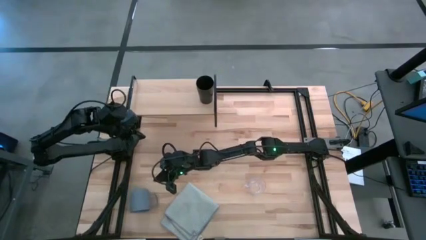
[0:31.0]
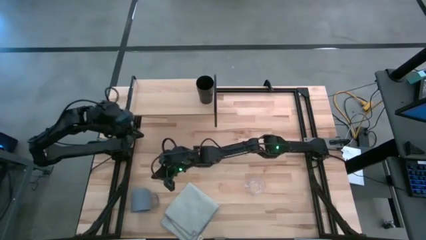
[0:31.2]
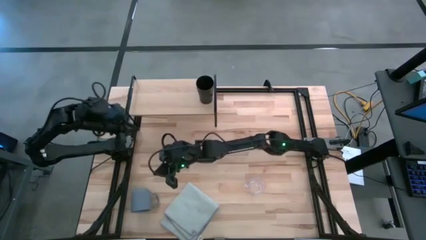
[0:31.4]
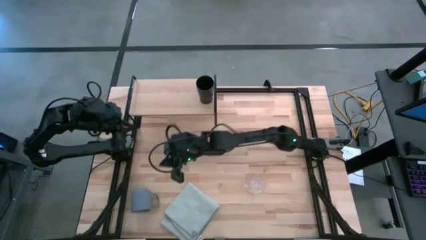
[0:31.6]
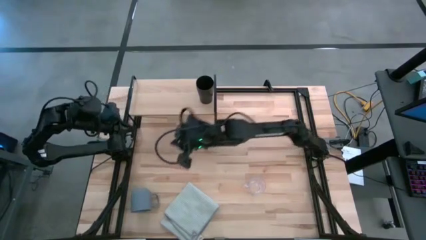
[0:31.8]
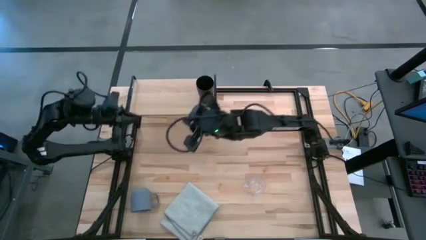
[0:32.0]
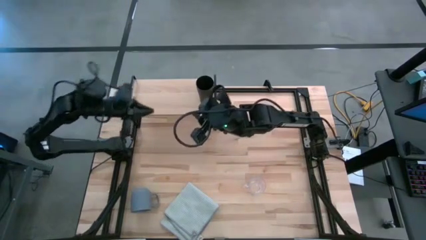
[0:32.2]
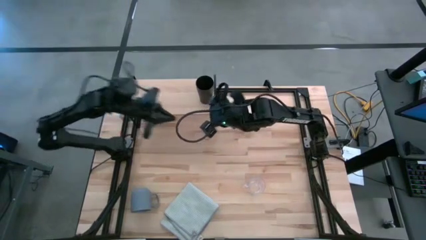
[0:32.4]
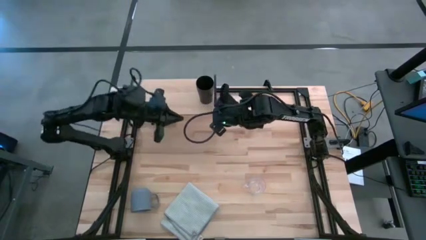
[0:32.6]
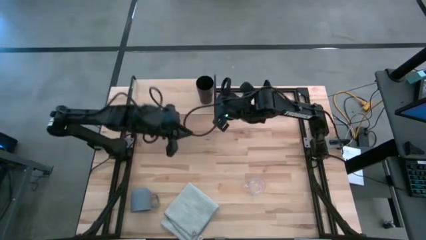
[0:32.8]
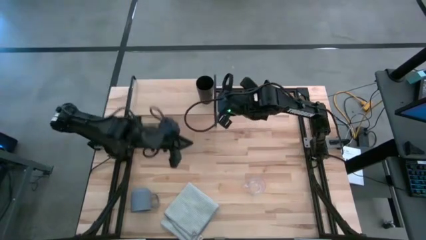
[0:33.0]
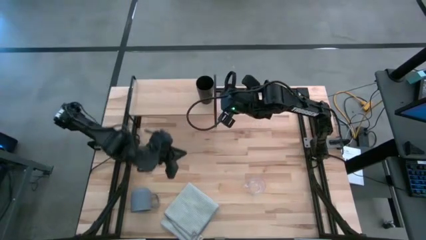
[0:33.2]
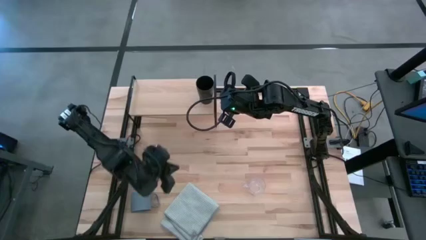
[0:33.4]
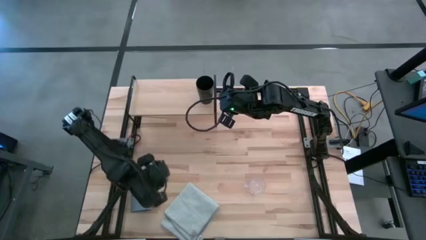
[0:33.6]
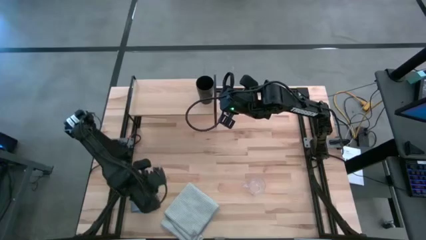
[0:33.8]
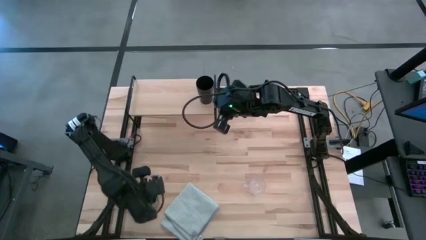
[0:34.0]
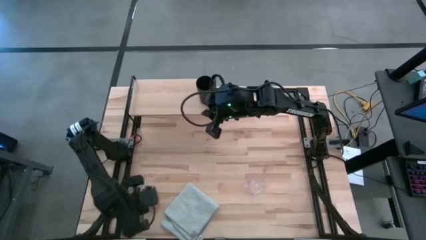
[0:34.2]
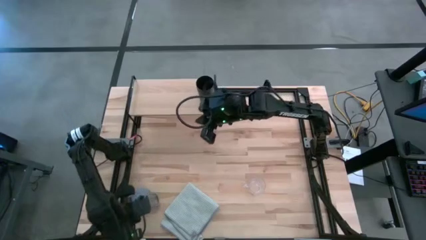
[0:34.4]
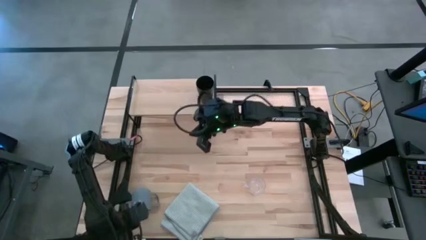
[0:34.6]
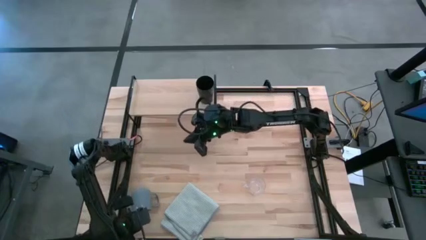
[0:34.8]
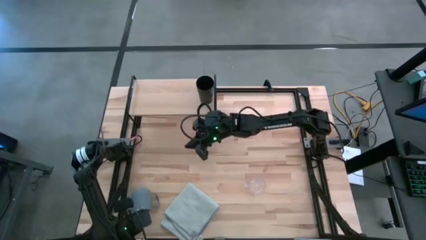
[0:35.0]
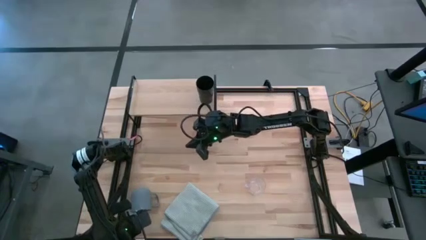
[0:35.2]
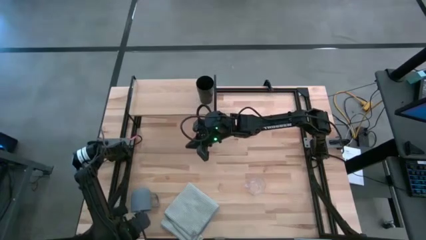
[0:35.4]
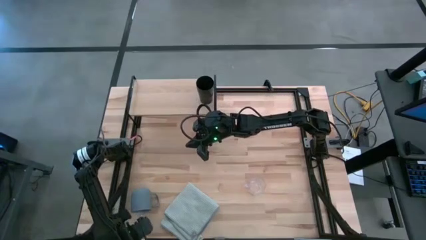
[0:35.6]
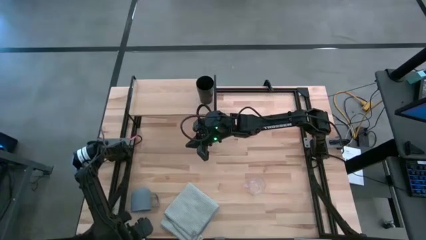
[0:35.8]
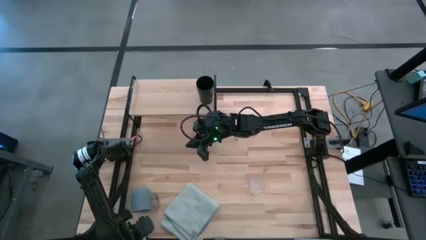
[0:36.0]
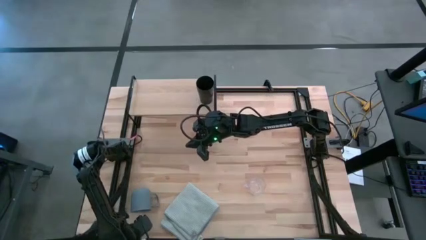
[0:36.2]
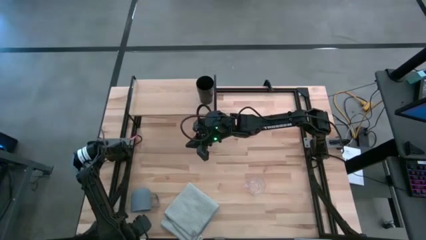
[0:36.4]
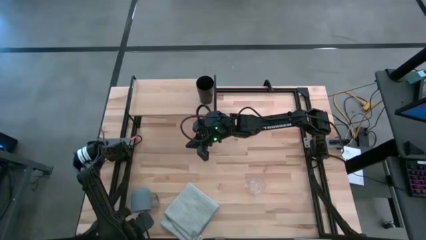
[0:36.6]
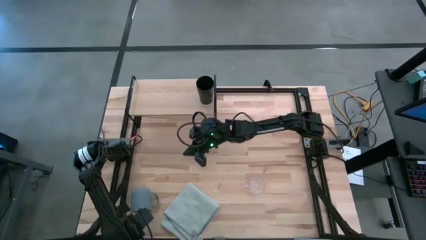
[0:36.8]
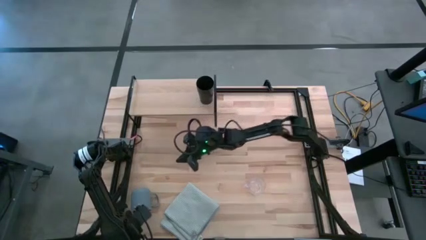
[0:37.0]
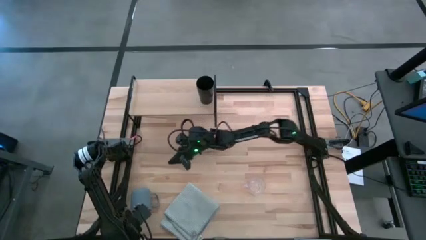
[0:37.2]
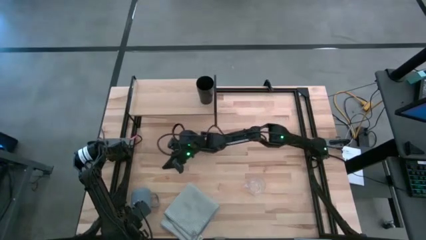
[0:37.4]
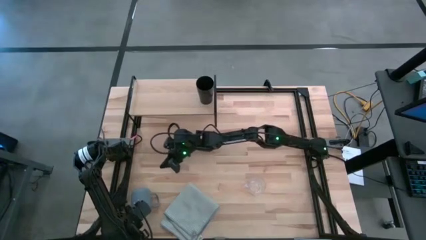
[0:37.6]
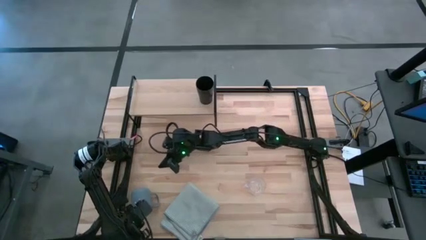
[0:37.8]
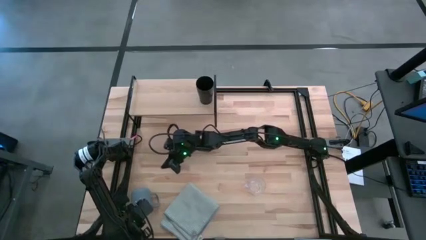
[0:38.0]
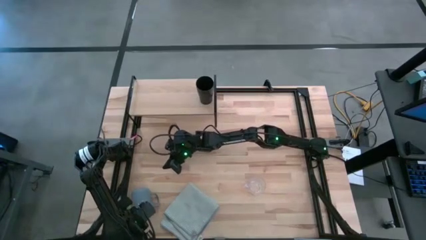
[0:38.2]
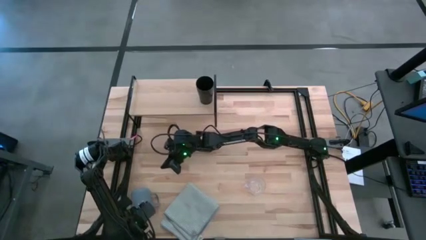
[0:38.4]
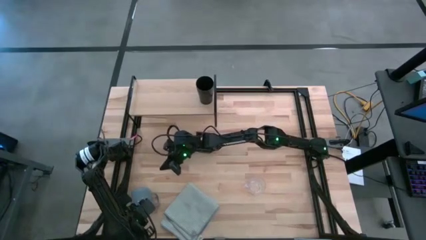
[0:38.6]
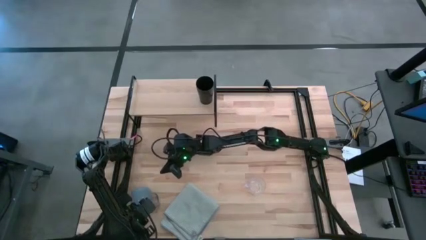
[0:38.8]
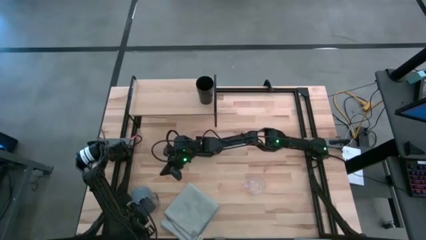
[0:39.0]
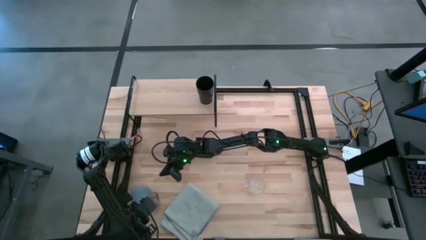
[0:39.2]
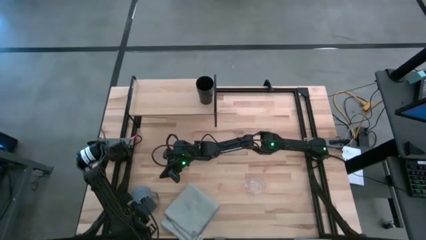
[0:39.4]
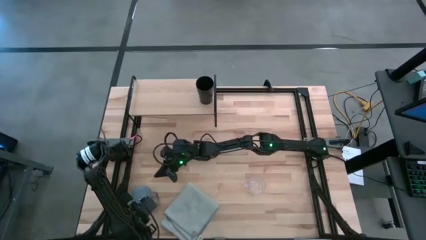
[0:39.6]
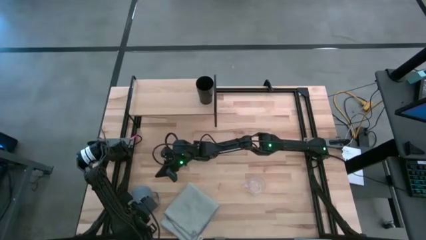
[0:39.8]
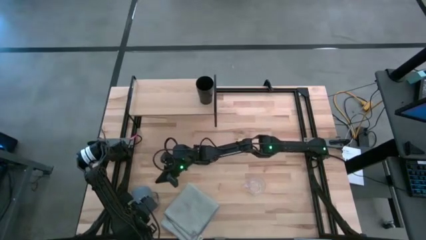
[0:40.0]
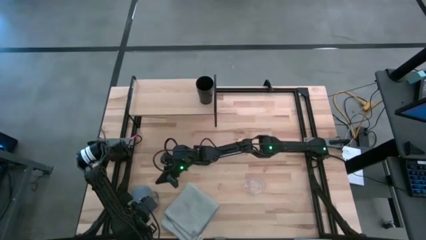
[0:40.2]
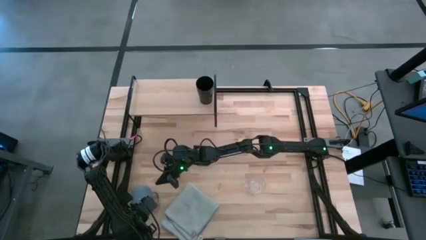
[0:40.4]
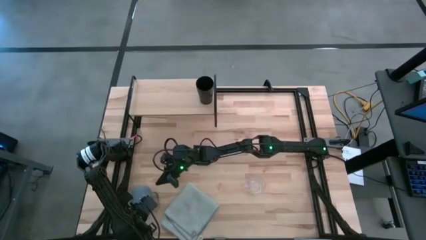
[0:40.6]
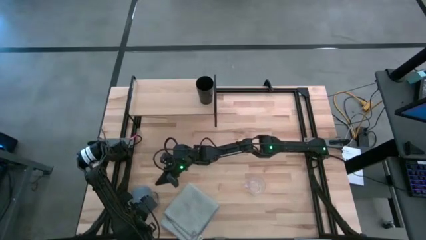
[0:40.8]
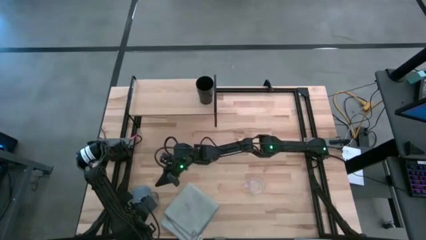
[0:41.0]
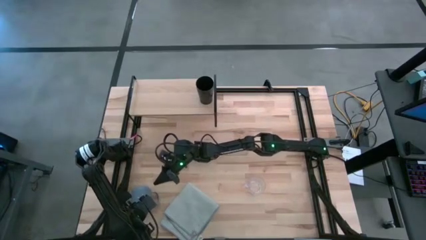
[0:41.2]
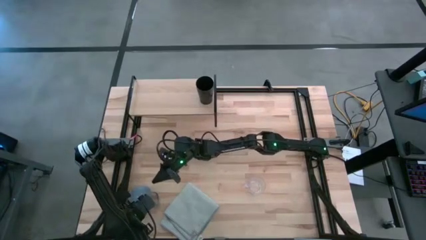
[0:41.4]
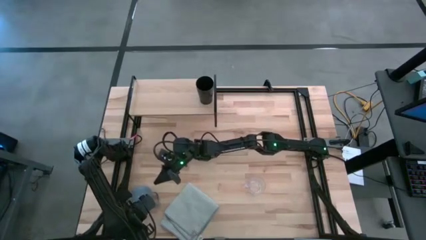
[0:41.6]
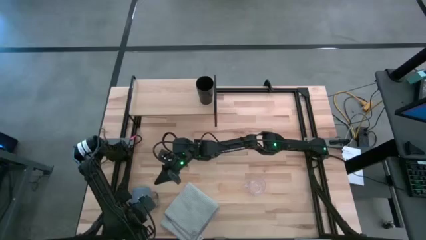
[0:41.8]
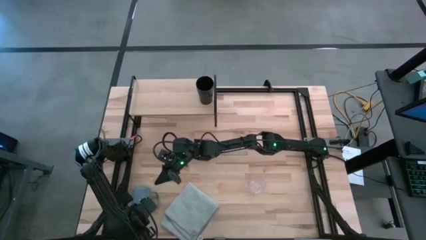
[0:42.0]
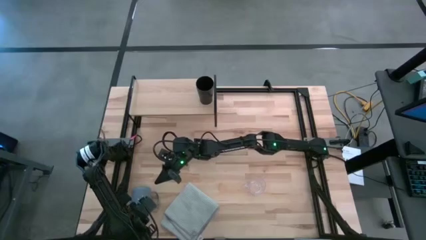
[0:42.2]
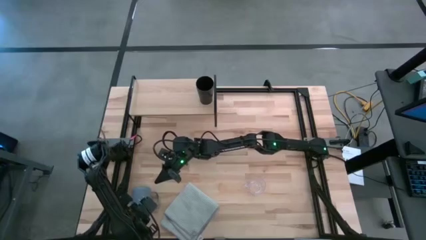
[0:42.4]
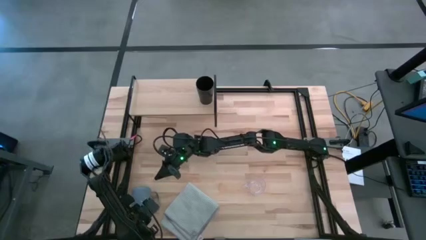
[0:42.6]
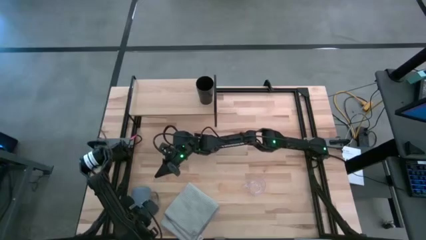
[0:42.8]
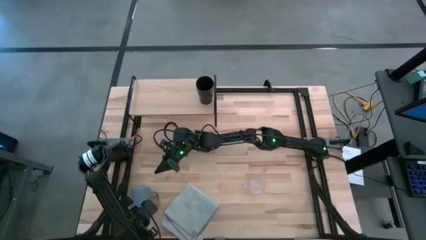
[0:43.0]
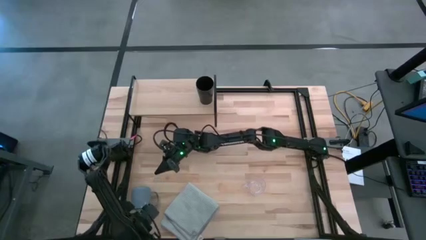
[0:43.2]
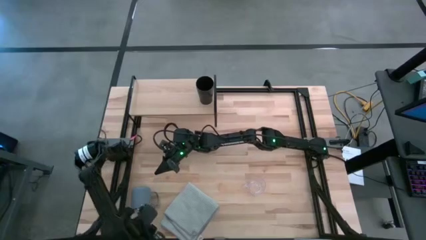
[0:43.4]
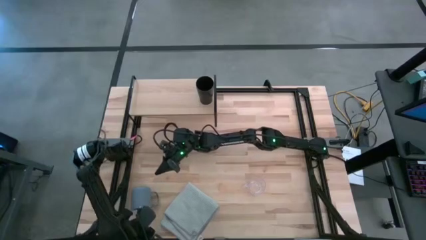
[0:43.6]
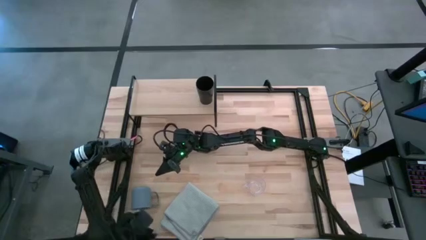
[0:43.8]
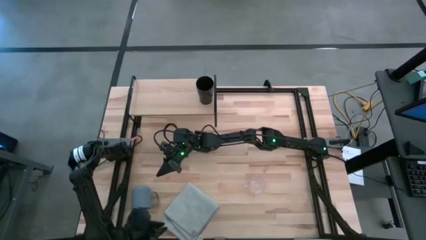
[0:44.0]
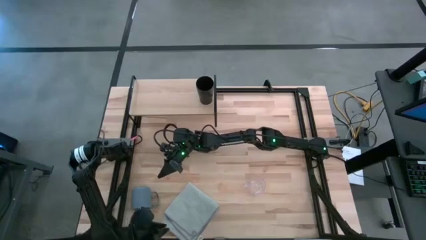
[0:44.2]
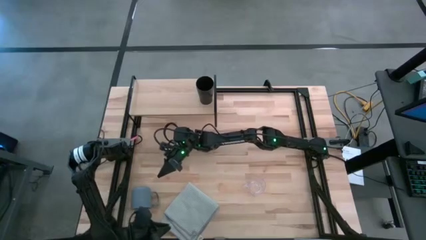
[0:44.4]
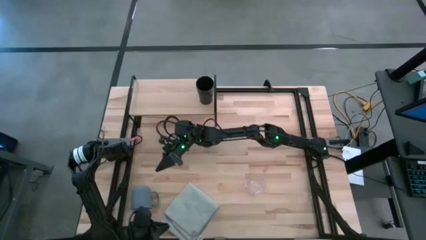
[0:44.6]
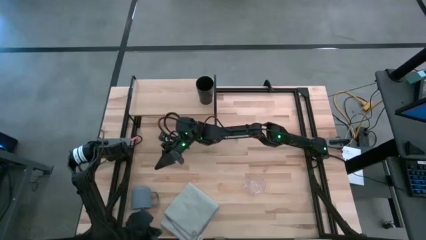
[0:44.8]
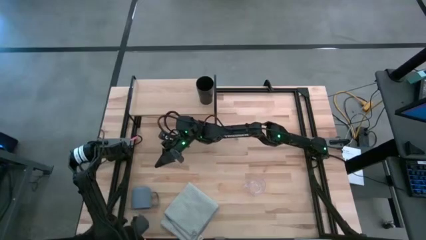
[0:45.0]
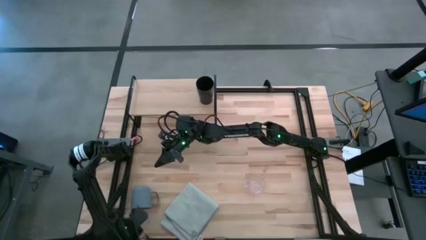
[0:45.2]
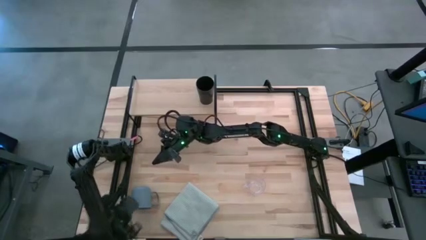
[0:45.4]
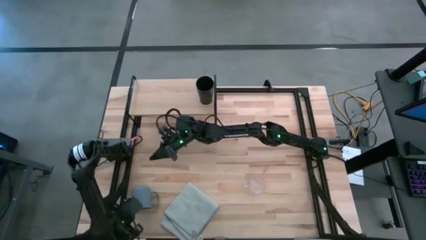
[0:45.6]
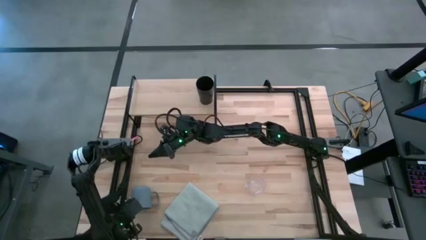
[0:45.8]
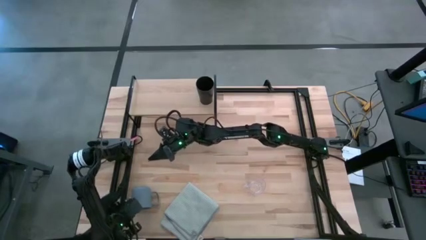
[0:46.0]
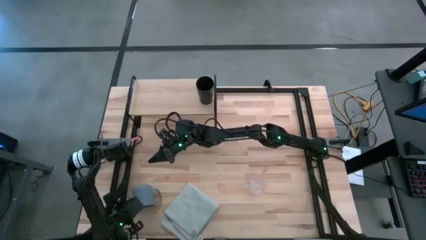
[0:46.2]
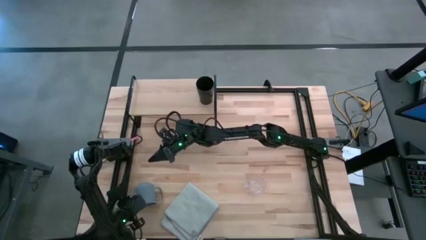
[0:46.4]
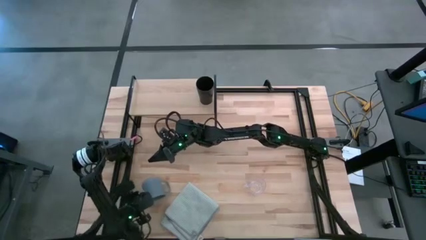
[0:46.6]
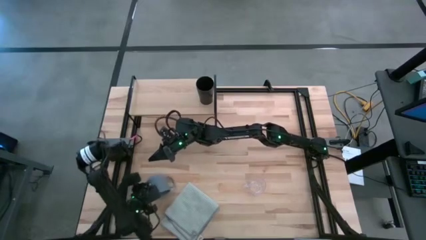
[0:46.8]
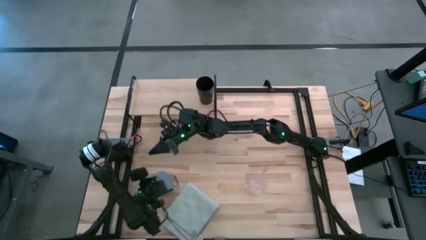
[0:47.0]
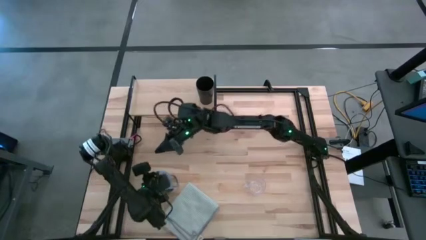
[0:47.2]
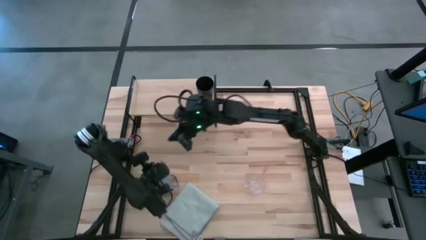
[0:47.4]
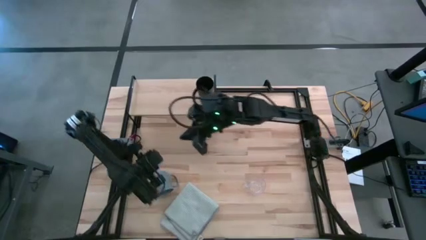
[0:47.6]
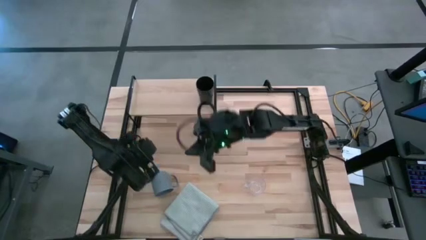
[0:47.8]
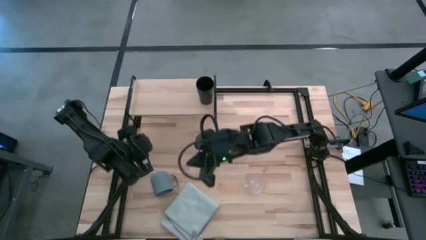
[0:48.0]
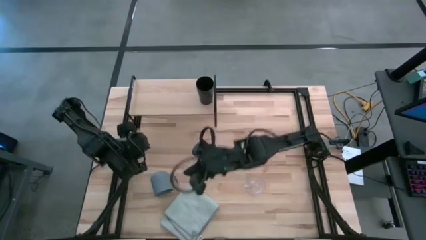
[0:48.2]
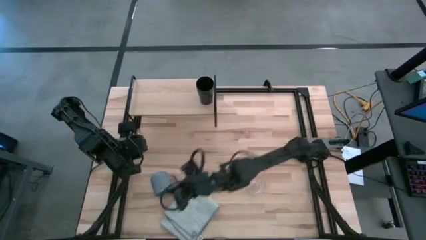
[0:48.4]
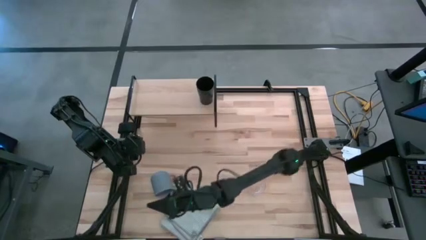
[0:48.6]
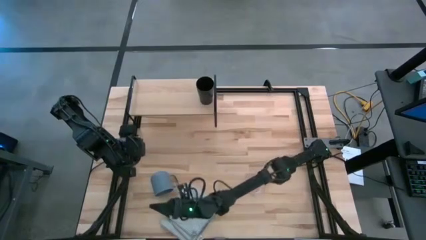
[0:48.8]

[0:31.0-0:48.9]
Task: Stack small to large cups/mugs on shelf
Put the blue mug on the shelf
